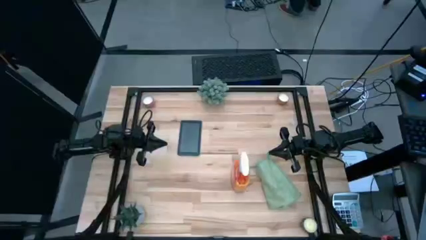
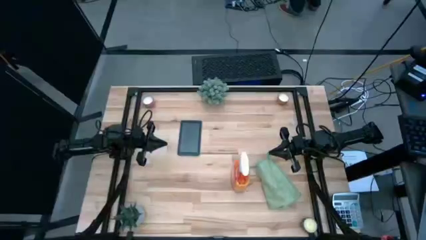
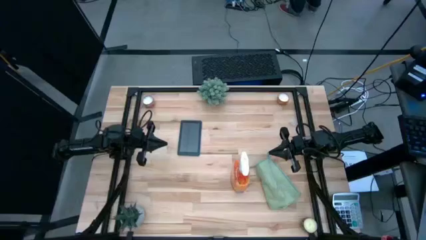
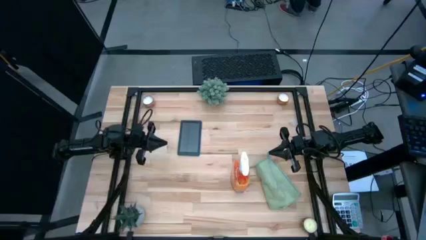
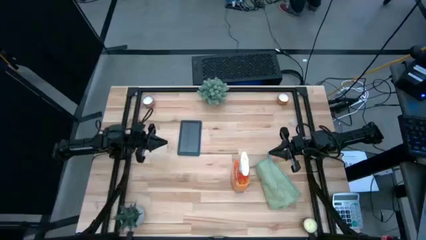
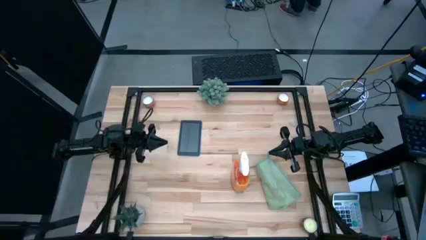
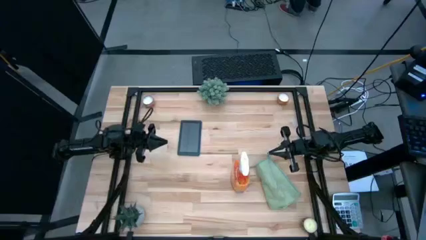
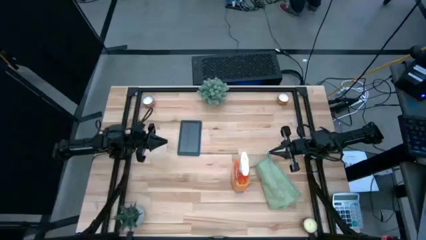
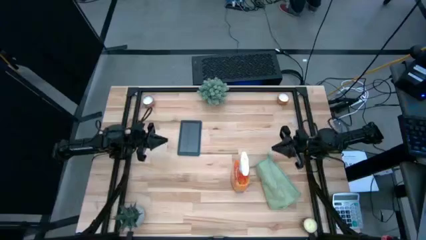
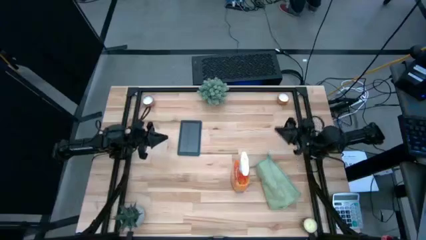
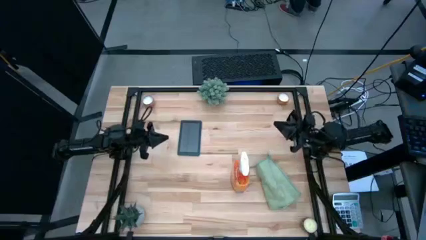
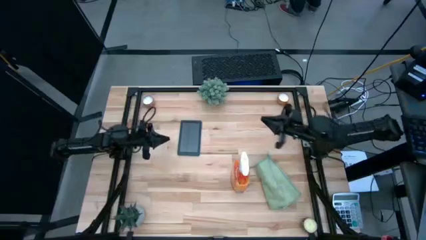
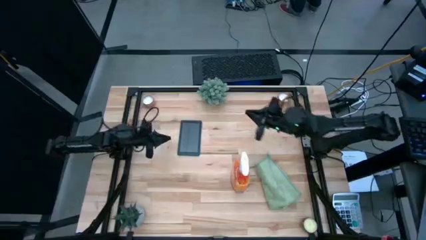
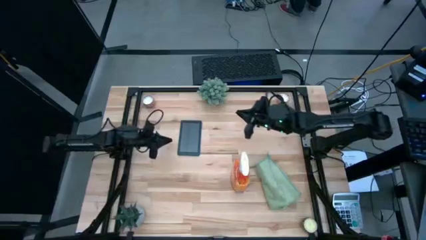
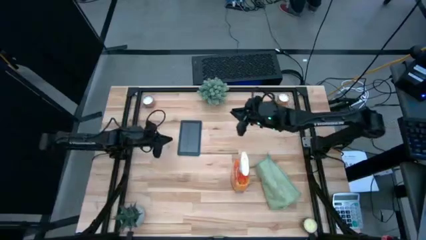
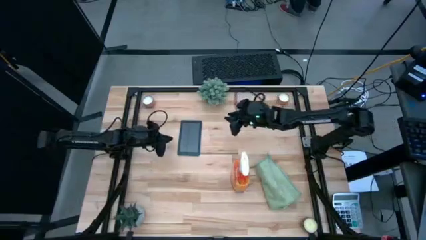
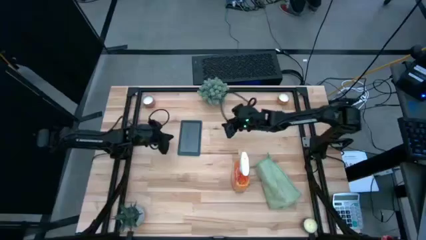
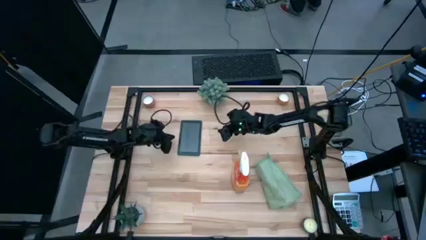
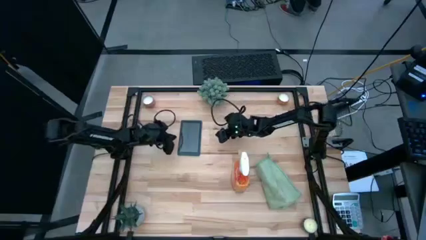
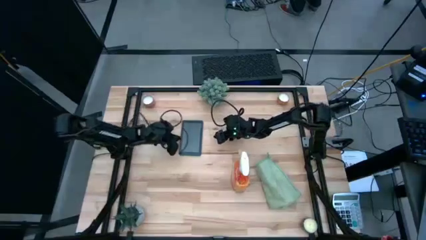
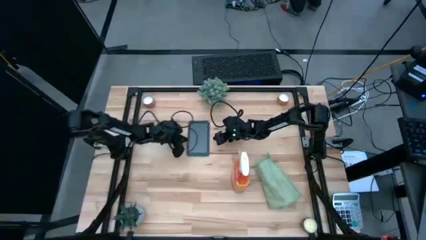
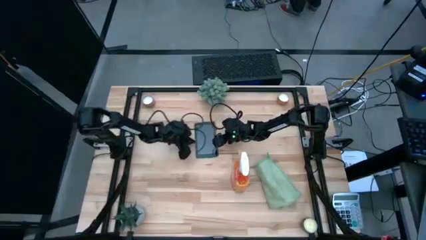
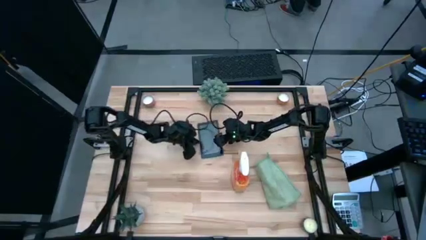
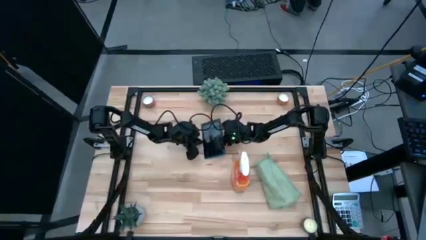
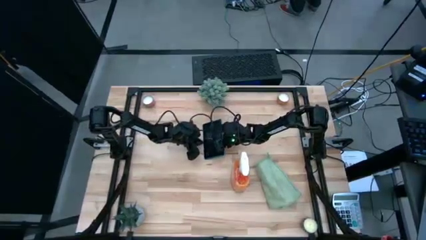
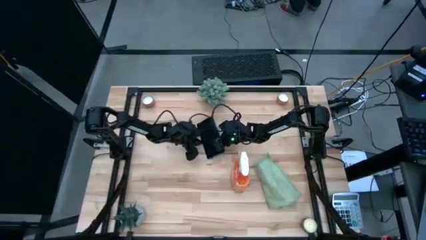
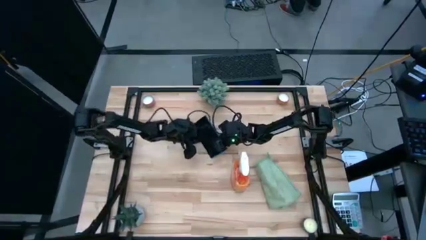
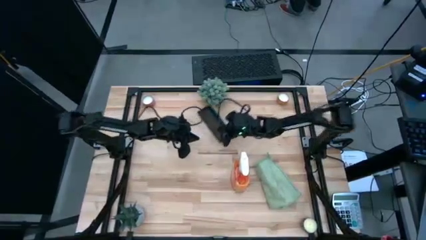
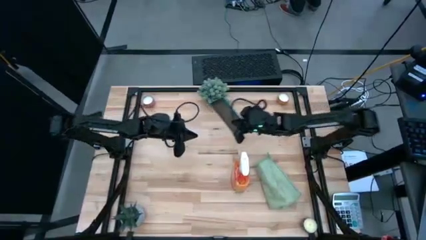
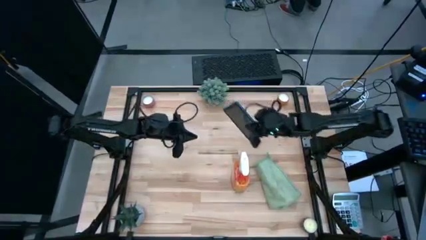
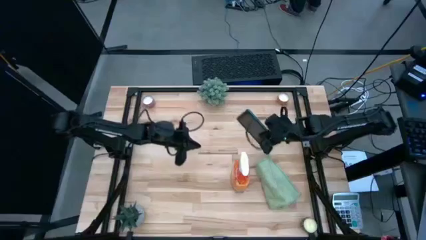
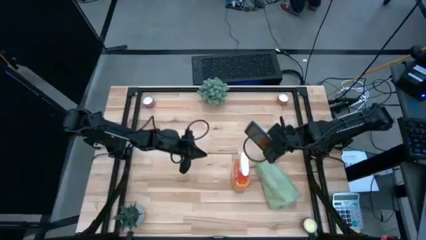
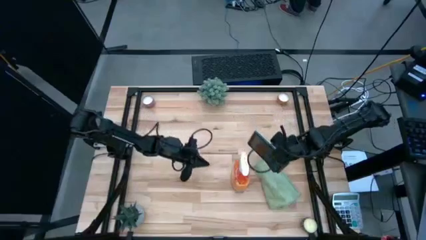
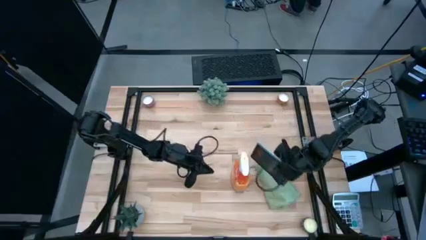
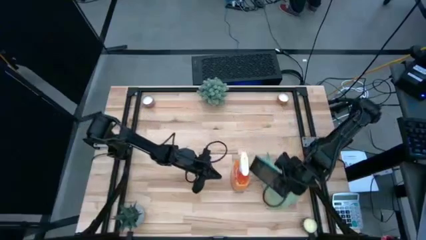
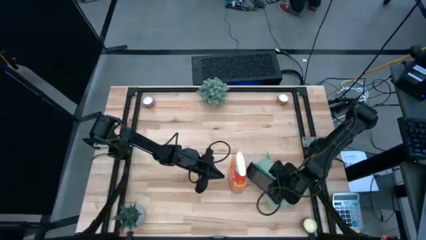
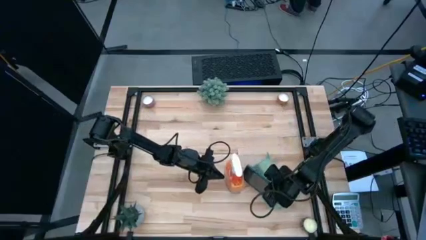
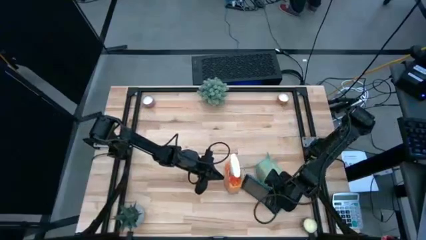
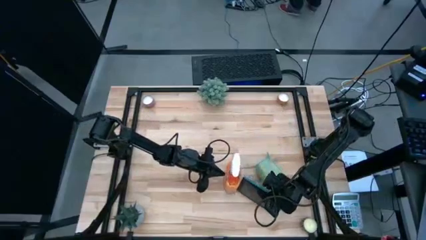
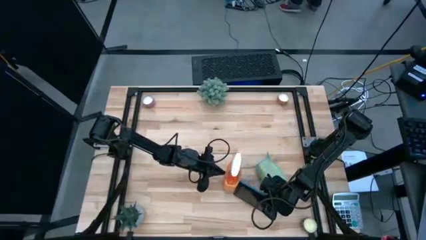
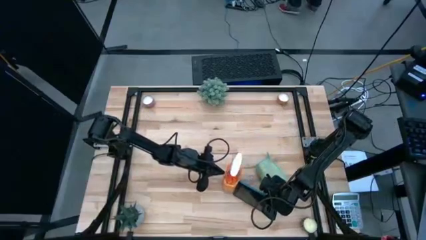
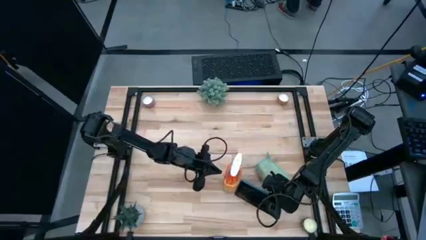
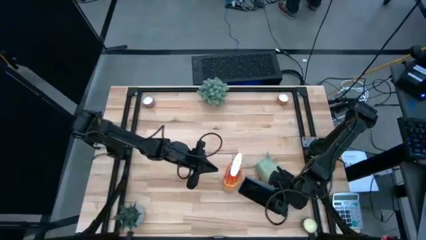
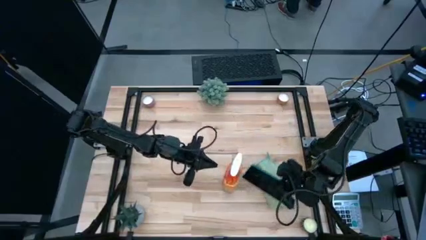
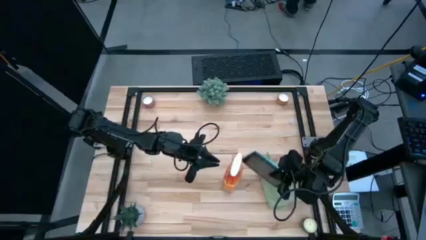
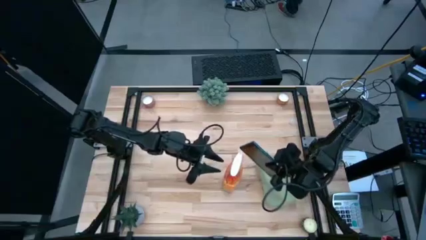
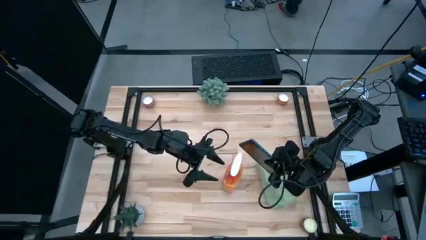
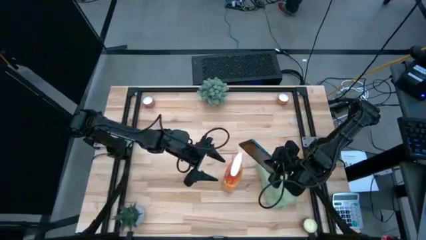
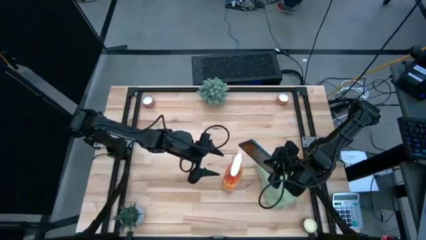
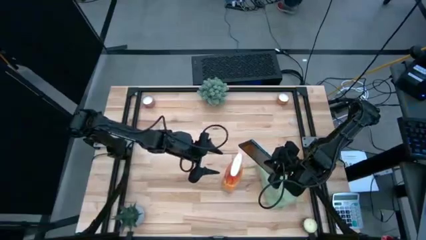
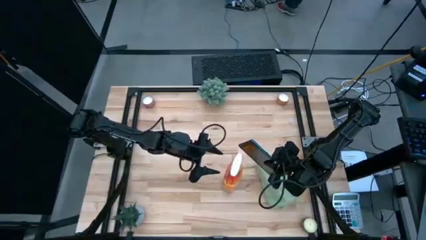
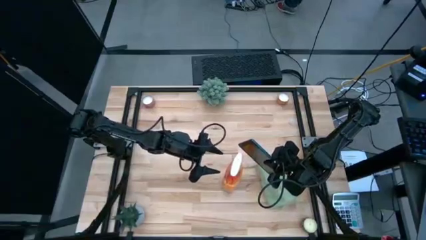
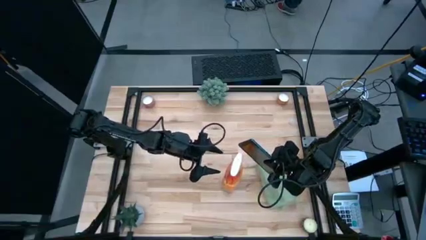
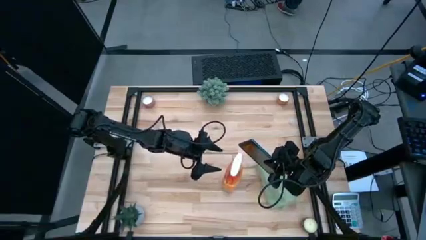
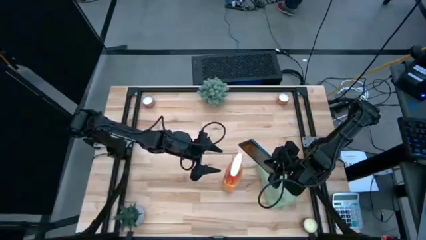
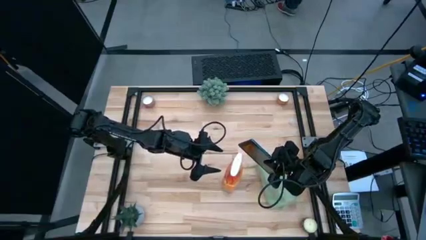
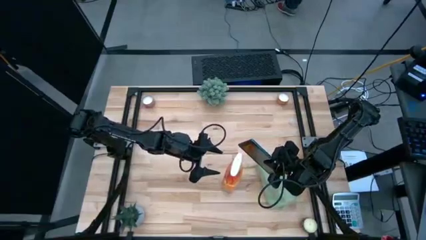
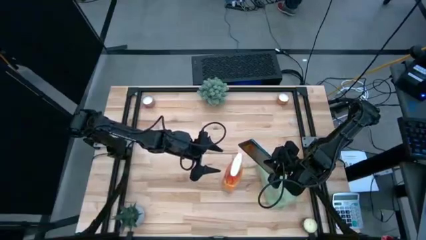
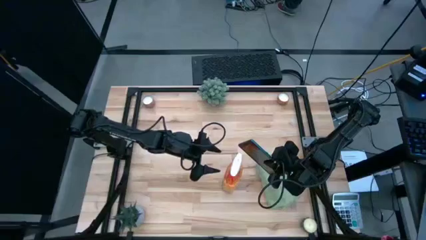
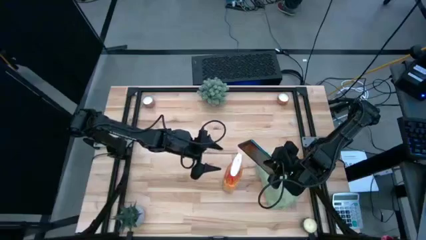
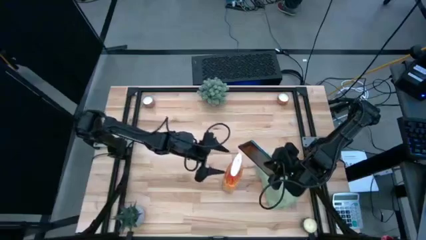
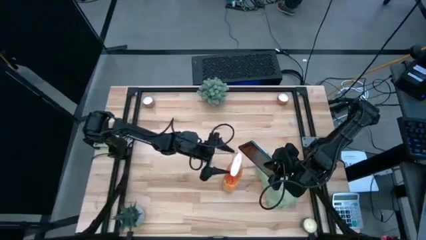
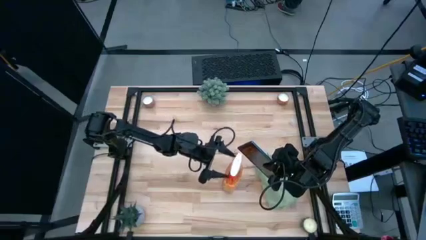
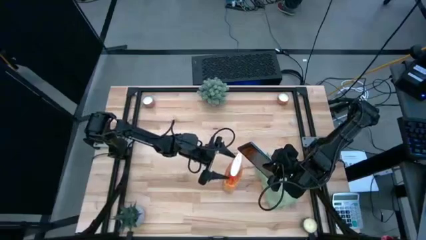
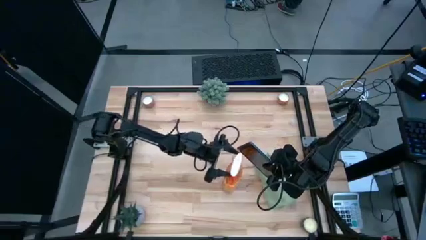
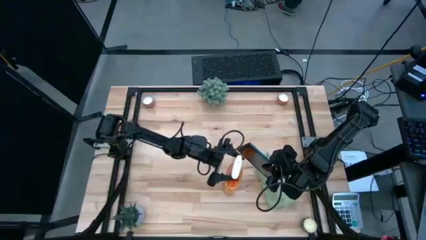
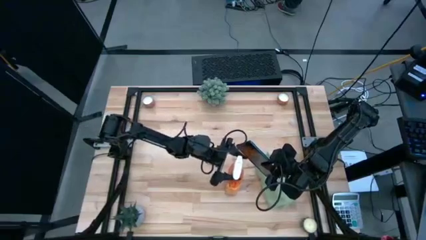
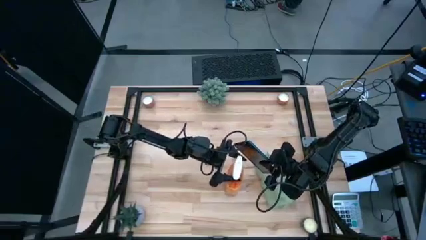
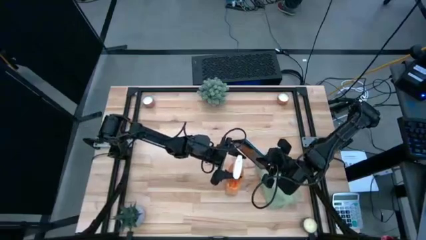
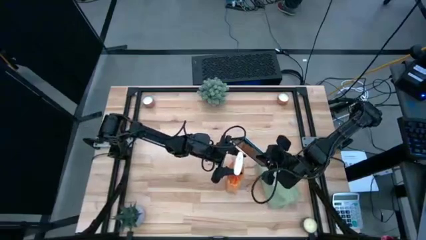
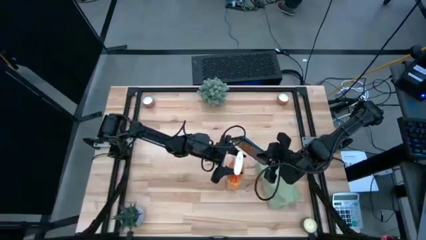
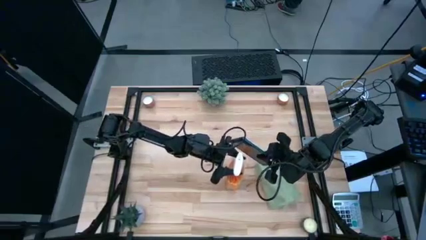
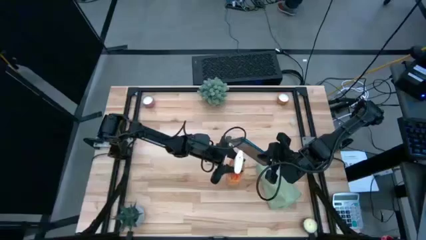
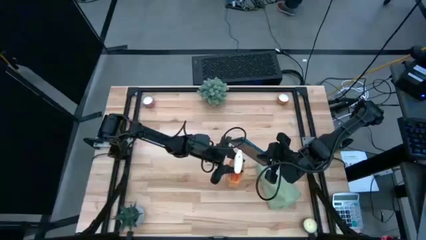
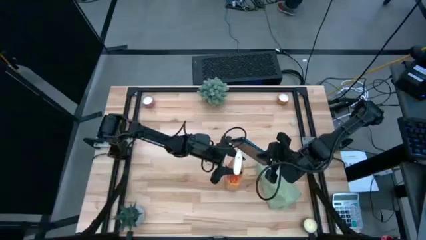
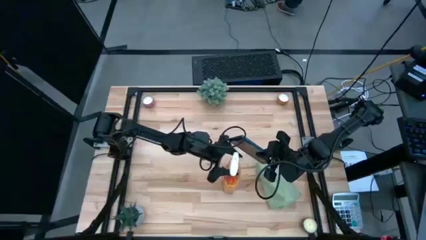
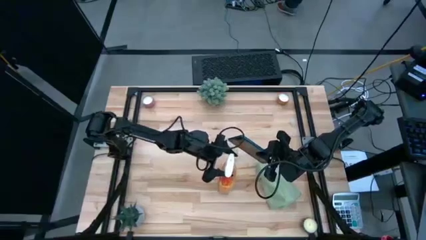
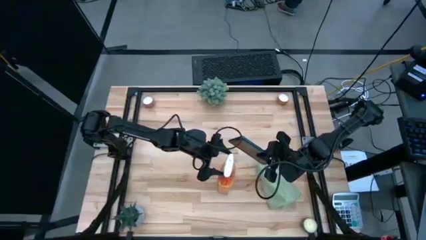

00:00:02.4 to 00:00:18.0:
Task: Apply microfiber cloth
Spray the front of the blue tablet using the orange spray bottle
